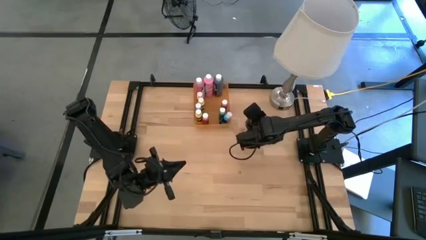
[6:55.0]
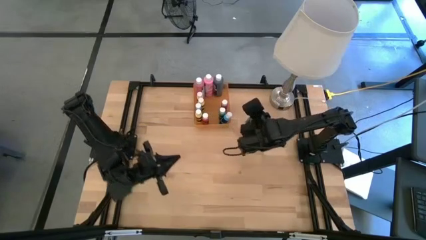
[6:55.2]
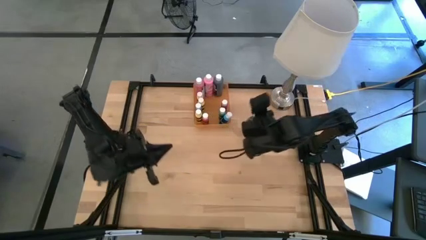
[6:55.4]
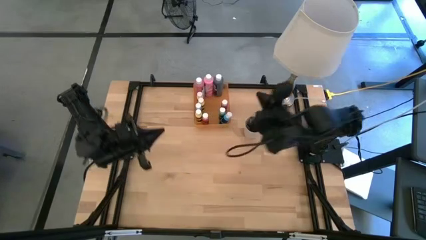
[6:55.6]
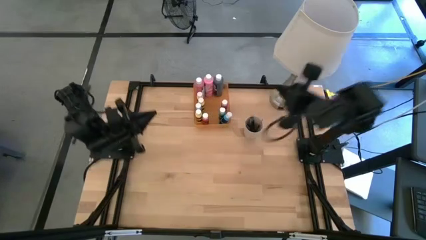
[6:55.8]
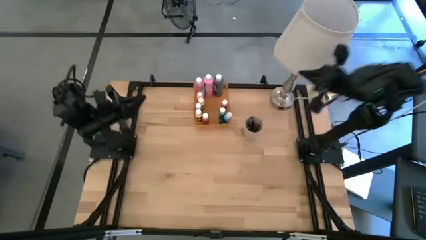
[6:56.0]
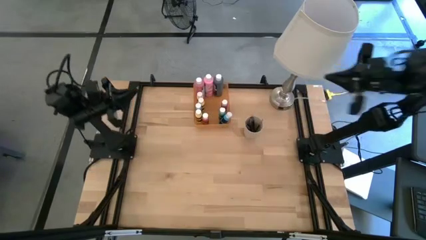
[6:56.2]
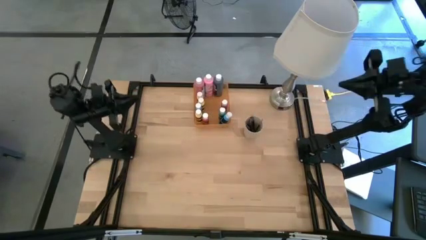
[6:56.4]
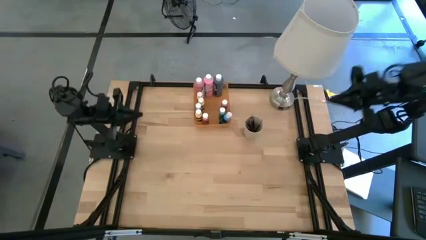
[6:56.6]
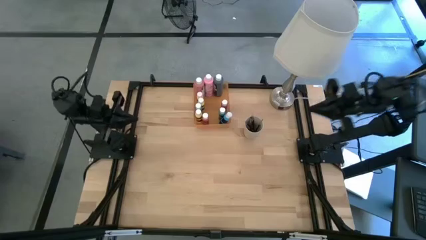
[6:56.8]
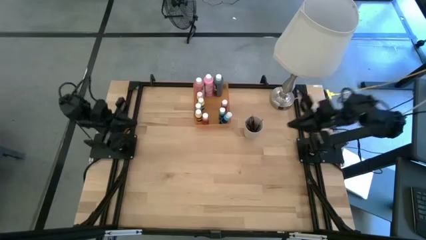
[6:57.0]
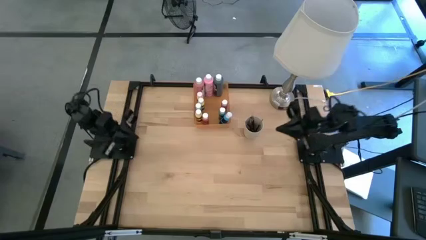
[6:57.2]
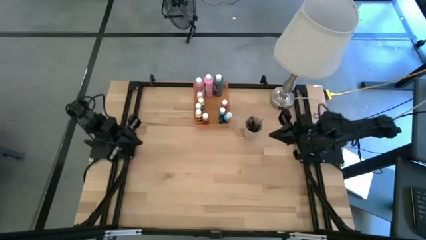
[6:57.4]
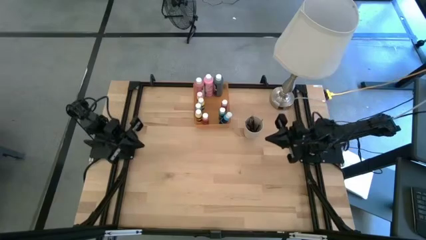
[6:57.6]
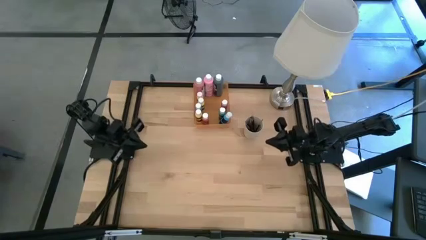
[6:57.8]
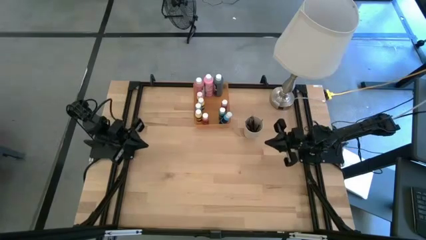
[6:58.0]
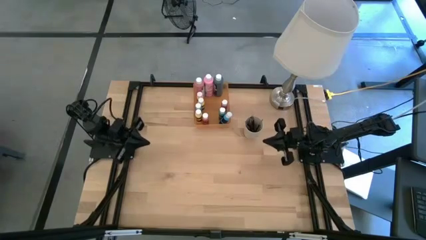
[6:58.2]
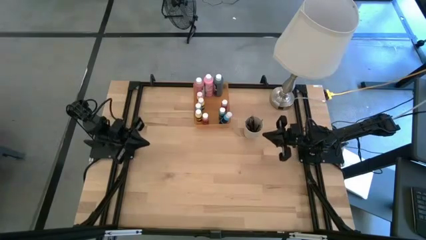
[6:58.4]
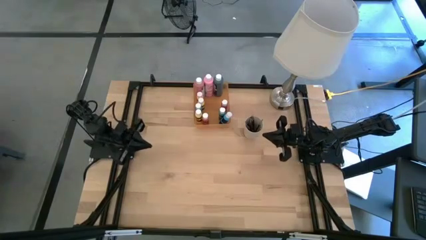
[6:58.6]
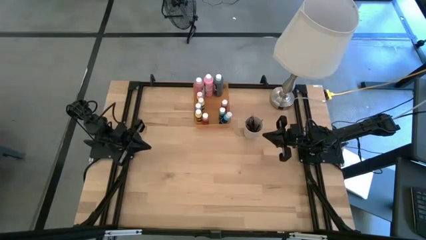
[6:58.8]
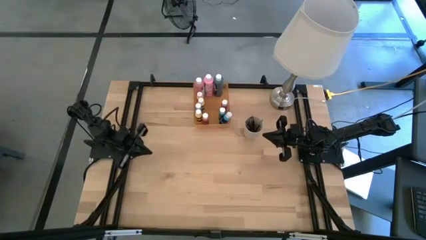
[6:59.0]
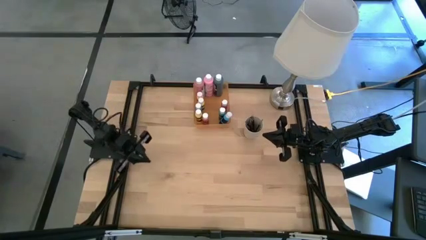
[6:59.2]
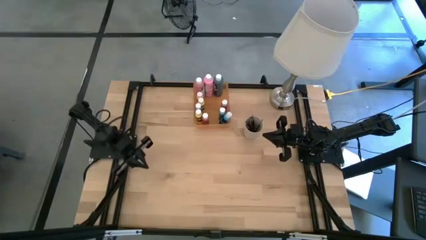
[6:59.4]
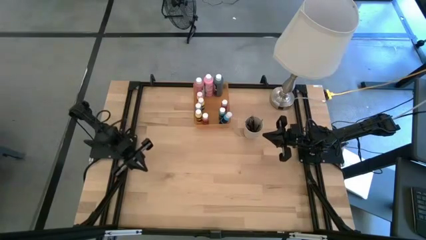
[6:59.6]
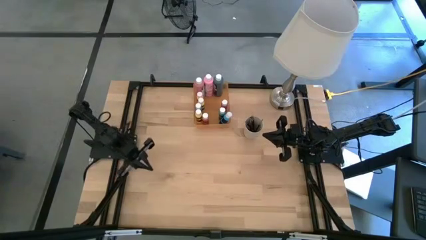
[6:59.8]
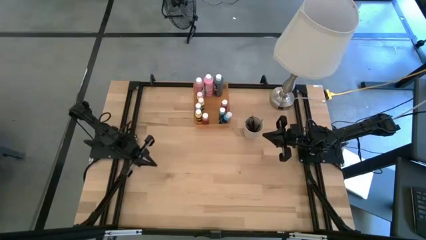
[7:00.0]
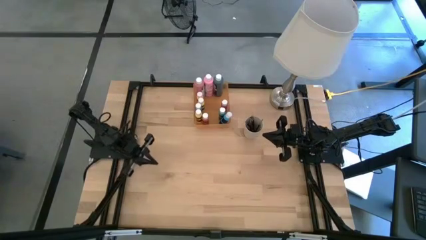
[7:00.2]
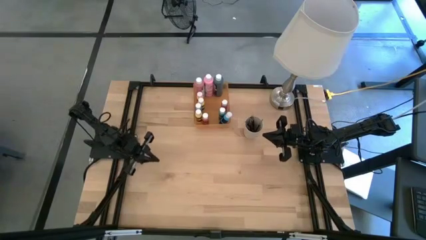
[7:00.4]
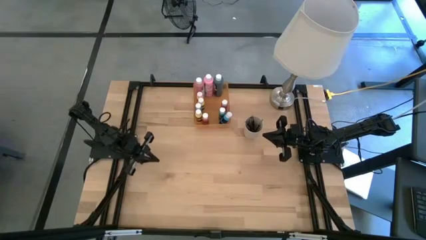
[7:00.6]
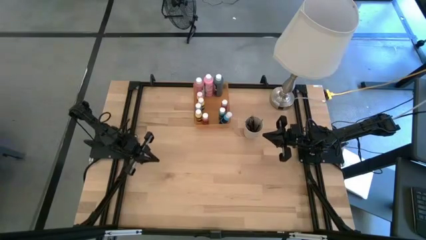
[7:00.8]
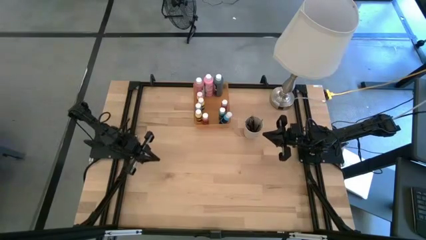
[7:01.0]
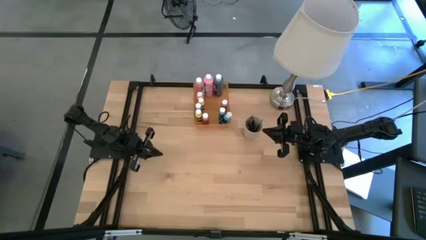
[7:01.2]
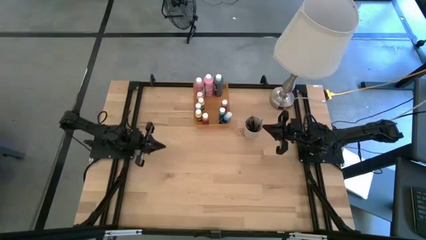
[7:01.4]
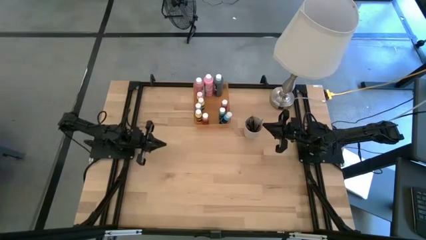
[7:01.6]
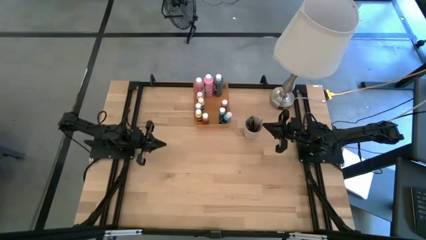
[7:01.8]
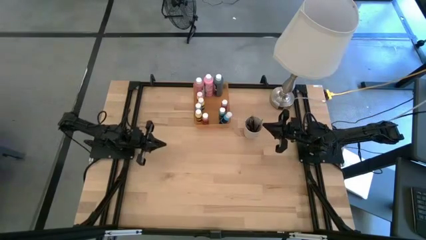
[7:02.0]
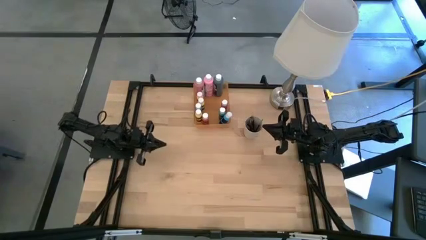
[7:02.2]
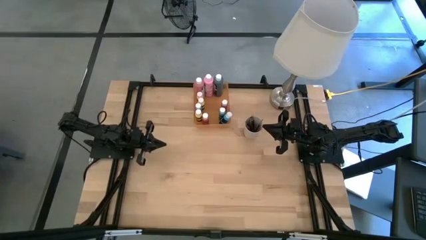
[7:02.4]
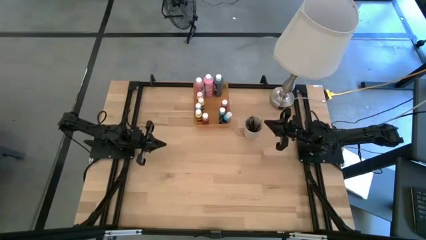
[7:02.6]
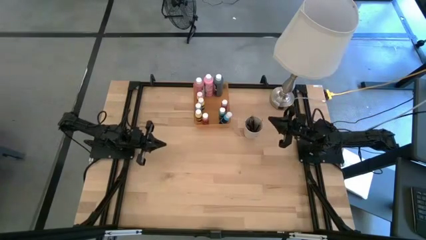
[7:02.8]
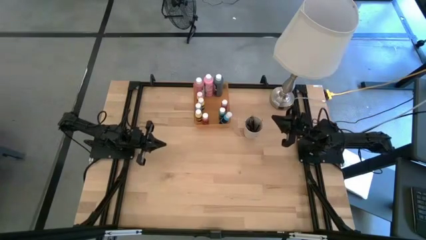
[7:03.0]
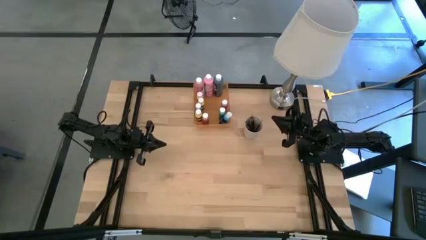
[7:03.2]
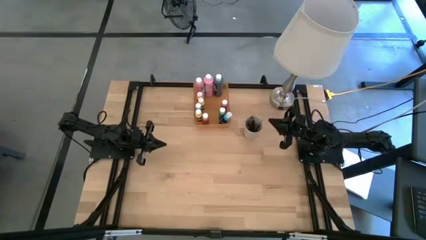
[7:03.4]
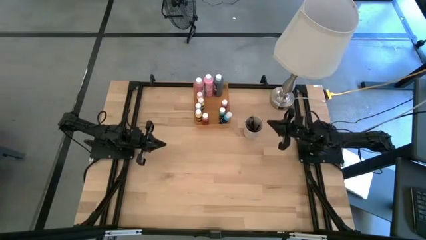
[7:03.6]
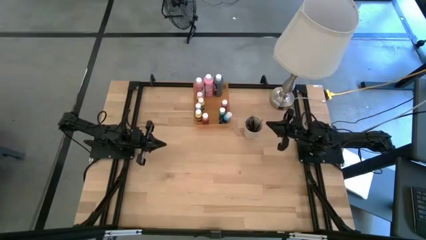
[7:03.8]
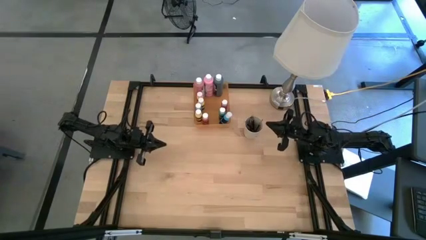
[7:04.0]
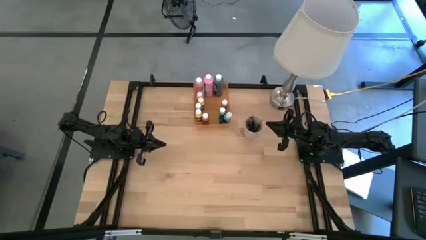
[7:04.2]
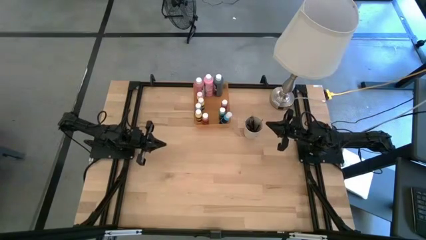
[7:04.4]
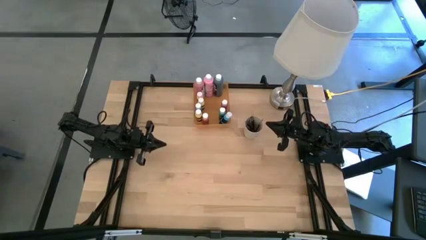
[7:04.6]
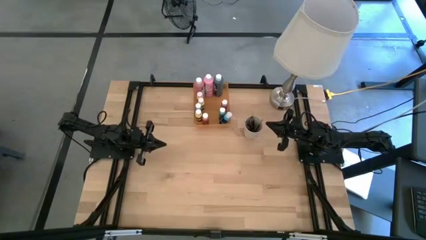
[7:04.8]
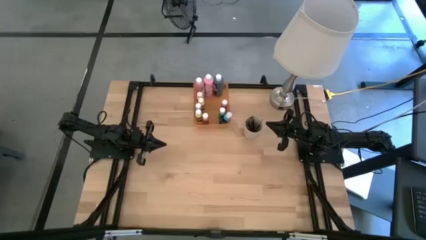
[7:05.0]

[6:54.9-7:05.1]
Task: Pick & Place Paint Supplies
Return to Home Position

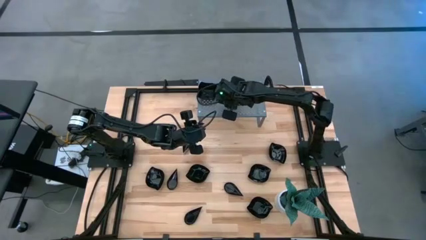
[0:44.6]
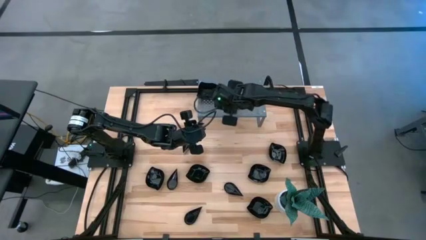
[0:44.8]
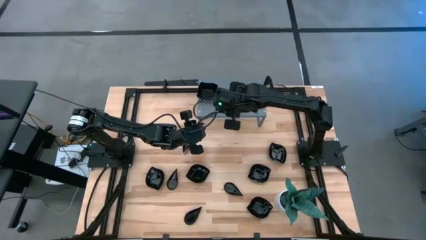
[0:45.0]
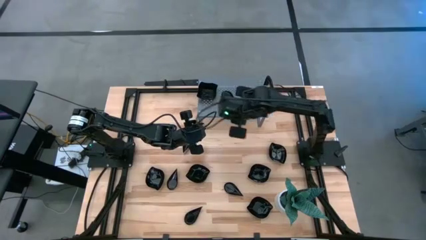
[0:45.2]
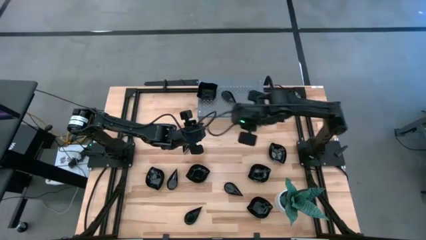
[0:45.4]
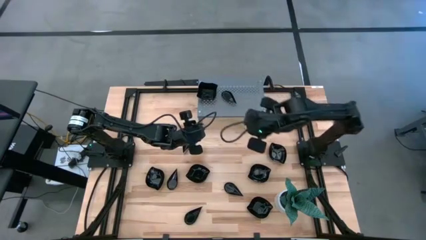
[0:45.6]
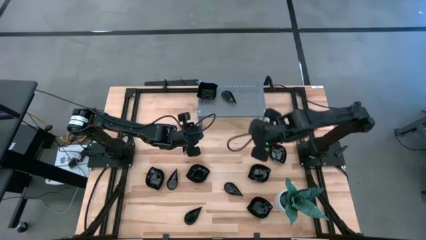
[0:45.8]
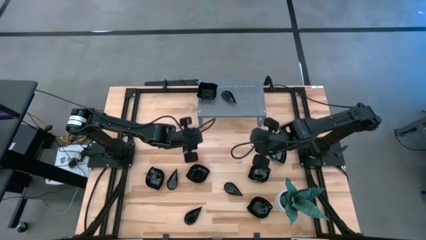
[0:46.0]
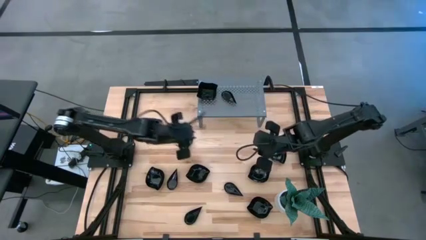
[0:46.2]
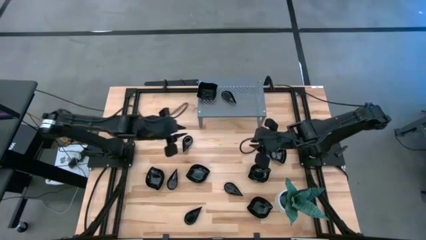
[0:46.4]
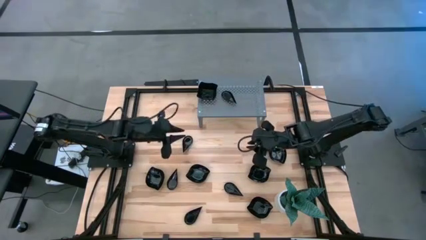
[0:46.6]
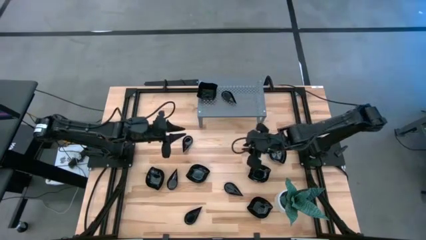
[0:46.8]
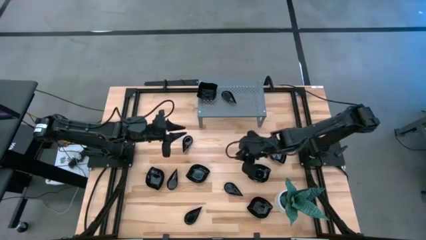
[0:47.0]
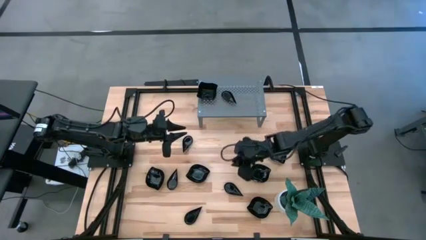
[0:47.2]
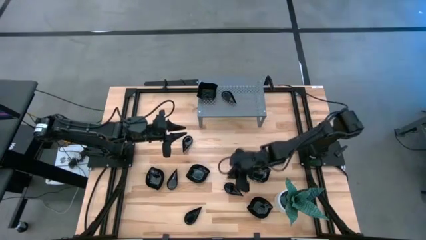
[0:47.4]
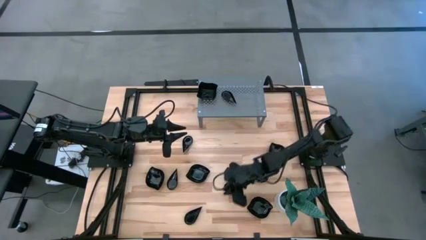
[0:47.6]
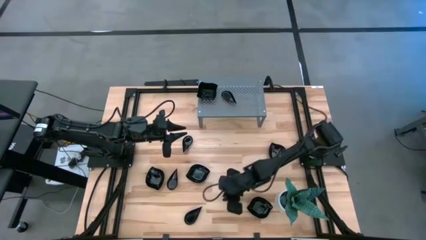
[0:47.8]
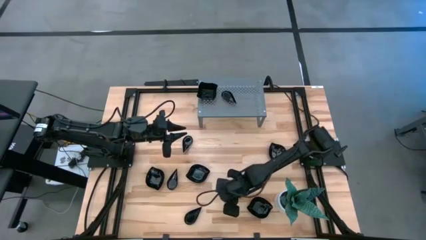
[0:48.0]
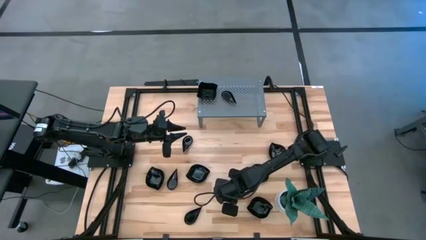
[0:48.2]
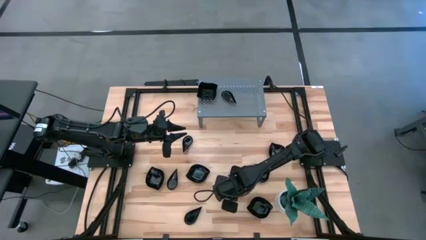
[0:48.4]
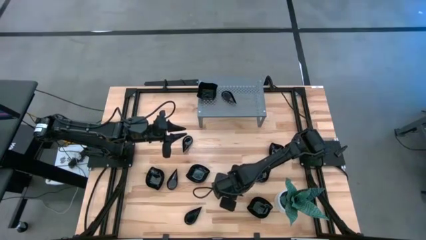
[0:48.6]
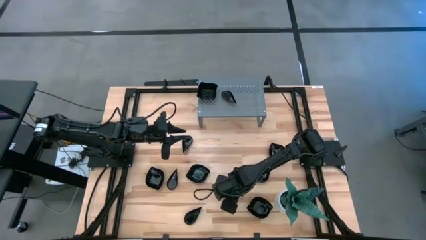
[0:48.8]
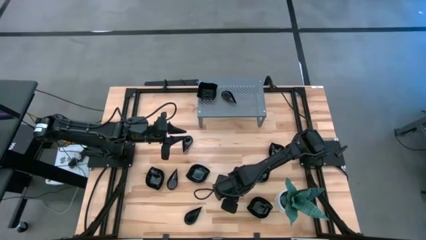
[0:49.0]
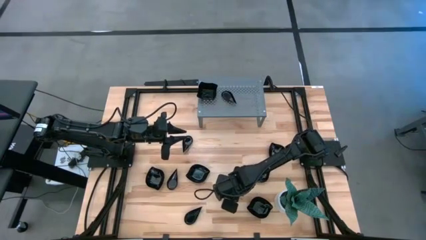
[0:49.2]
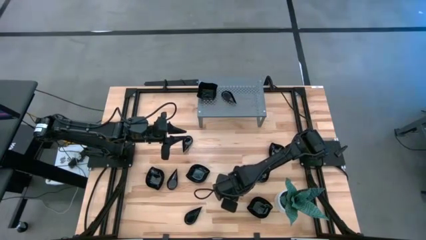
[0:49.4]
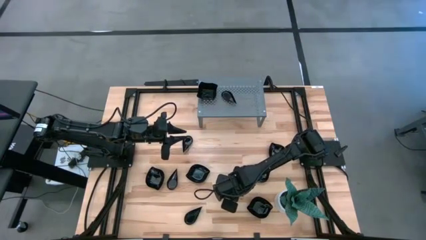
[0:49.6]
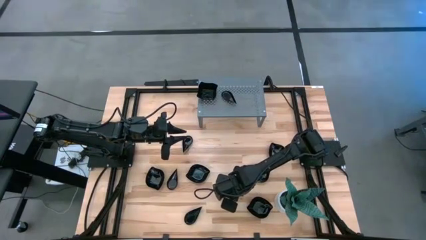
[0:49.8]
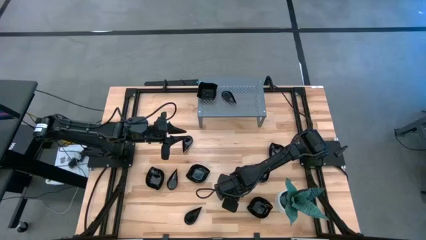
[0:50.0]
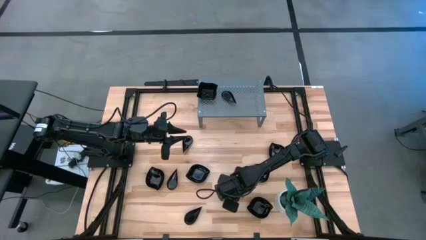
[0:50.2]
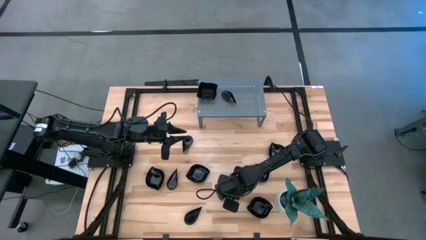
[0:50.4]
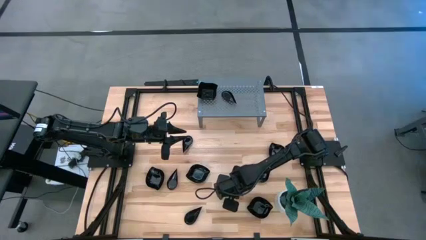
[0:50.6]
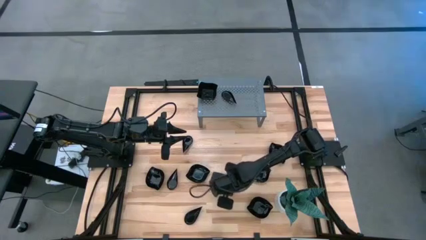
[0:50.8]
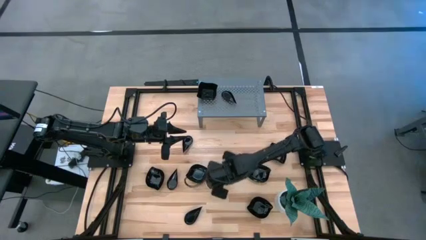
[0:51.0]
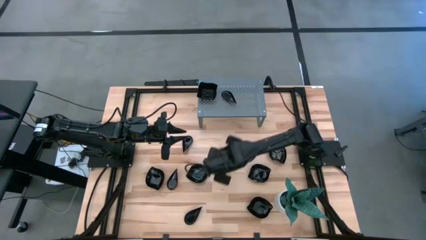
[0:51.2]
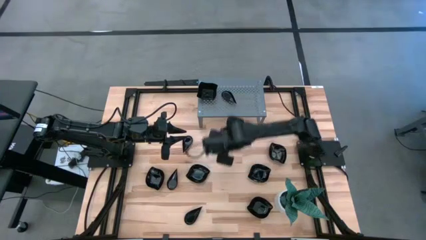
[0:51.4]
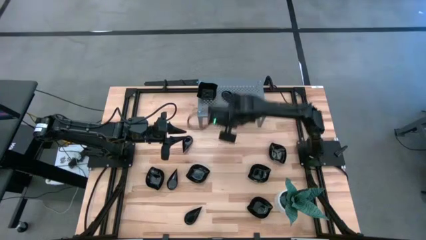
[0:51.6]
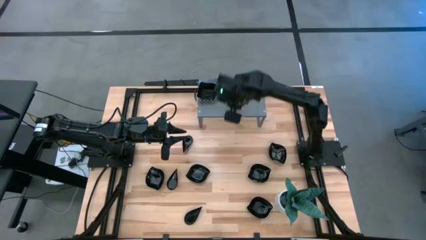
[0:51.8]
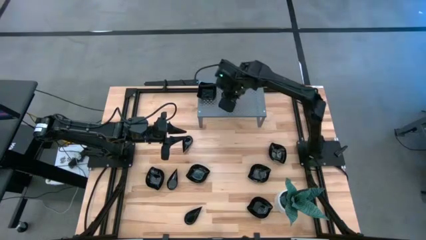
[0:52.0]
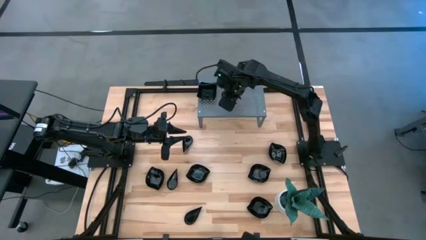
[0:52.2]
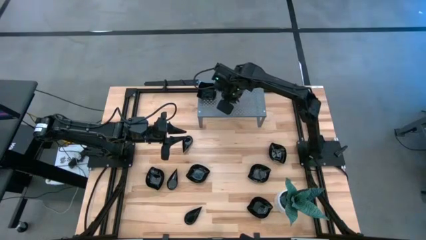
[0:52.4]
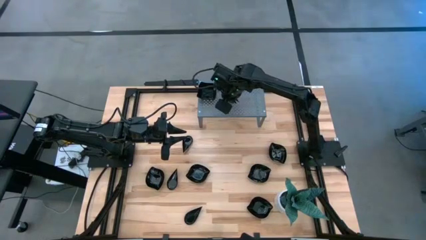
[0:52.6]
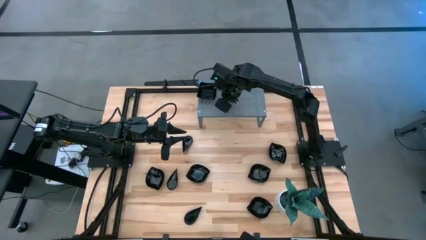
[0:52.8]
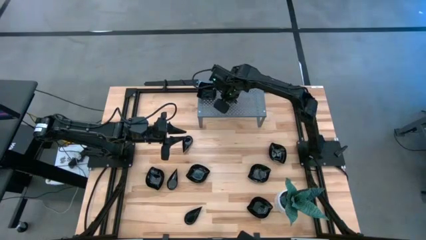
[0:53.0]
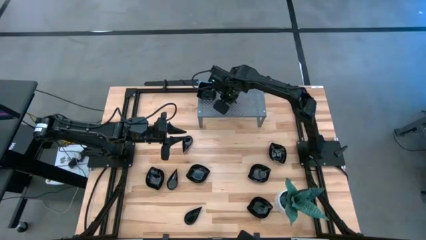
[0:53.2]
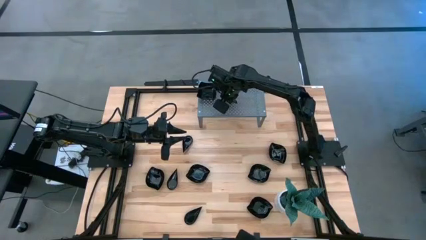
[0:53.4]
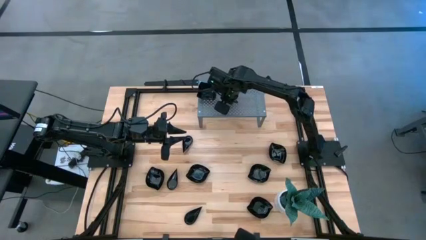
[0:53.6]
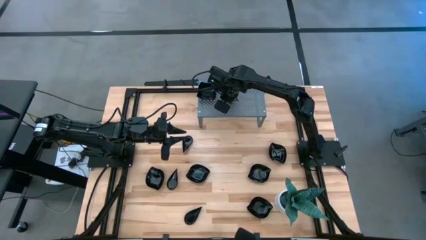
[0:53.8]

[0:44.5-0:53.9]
Task: Pick & Place Mini shaped plates
Stack the drop-shaped plate on top of the drop-shaped plate on the shelf
